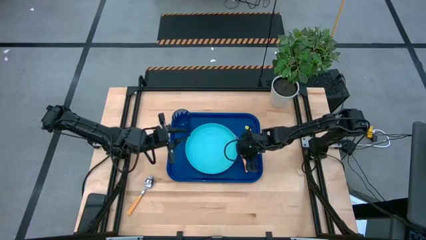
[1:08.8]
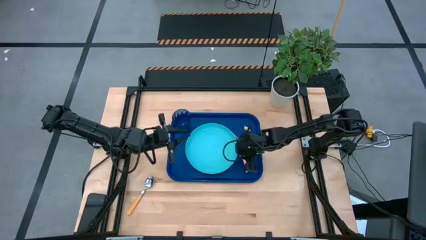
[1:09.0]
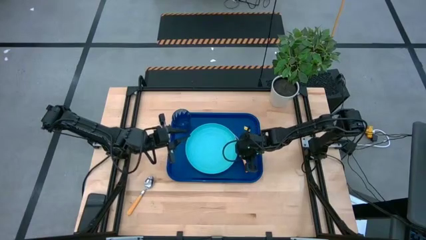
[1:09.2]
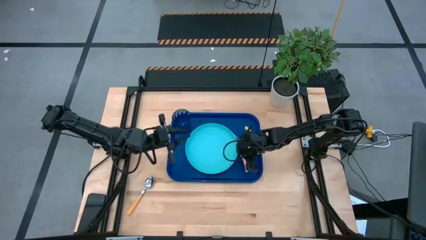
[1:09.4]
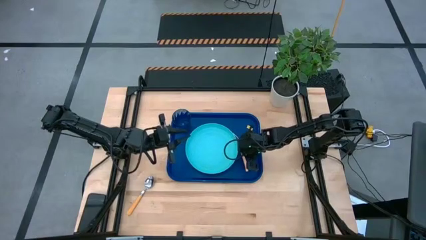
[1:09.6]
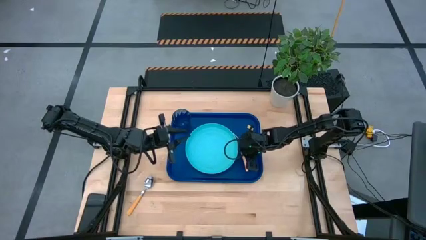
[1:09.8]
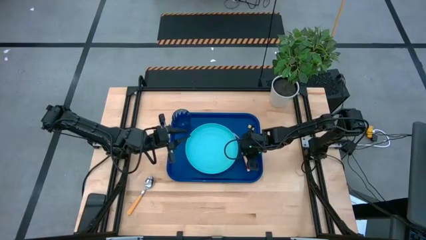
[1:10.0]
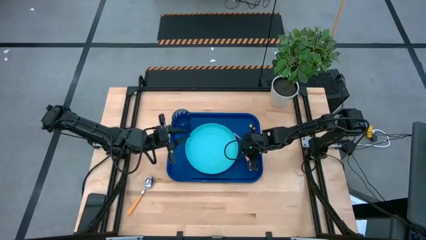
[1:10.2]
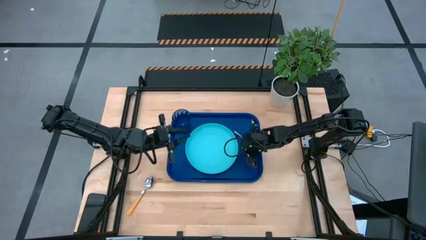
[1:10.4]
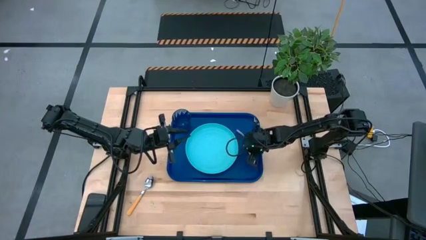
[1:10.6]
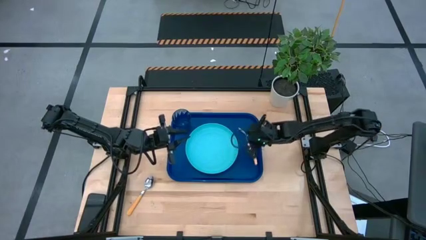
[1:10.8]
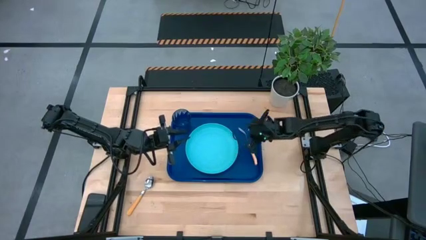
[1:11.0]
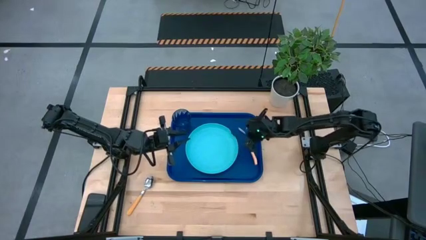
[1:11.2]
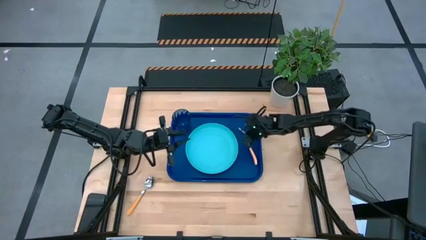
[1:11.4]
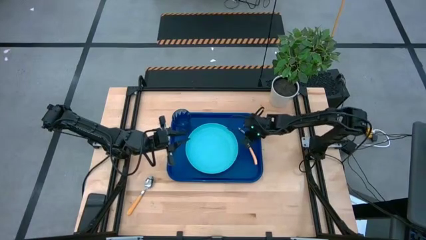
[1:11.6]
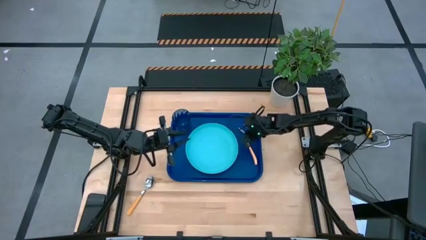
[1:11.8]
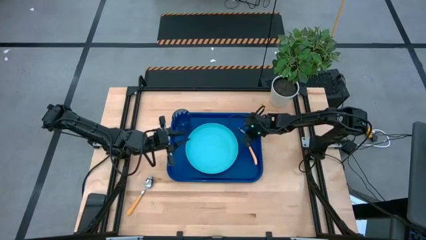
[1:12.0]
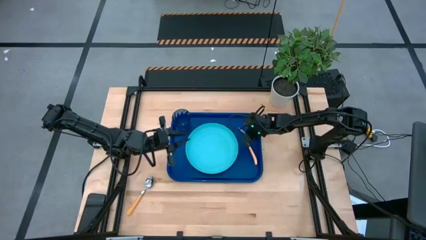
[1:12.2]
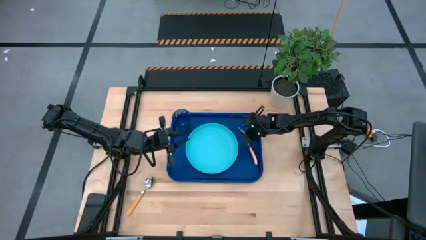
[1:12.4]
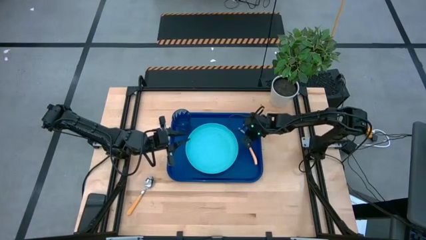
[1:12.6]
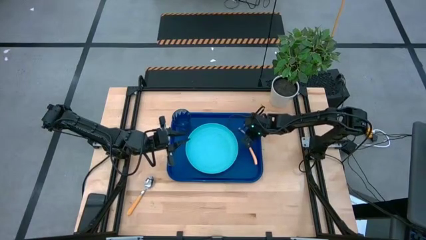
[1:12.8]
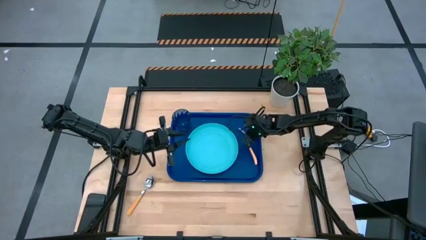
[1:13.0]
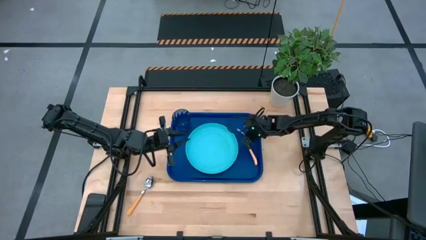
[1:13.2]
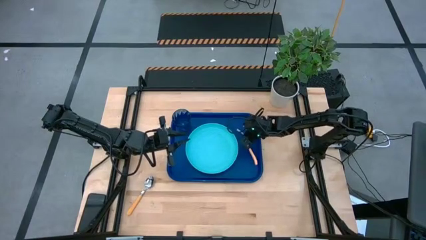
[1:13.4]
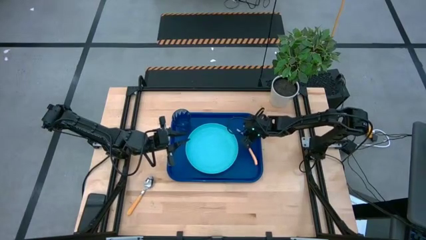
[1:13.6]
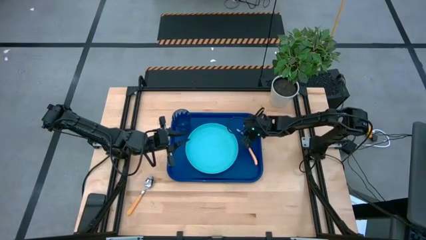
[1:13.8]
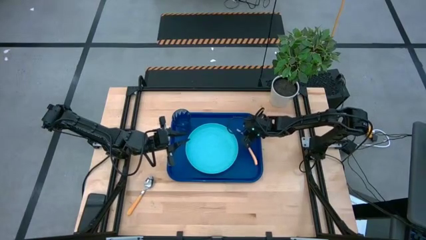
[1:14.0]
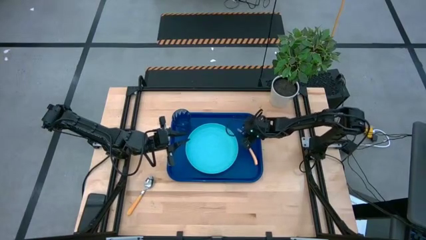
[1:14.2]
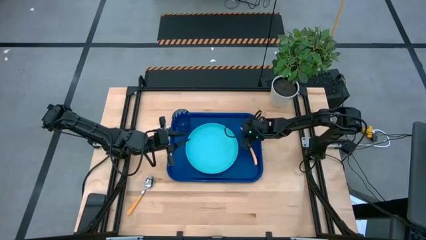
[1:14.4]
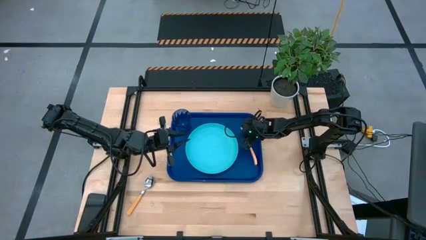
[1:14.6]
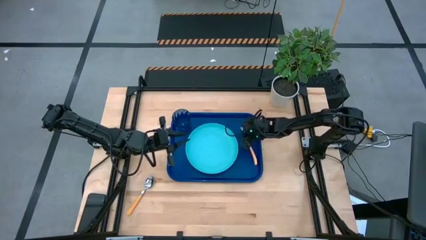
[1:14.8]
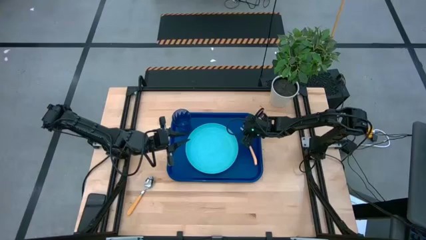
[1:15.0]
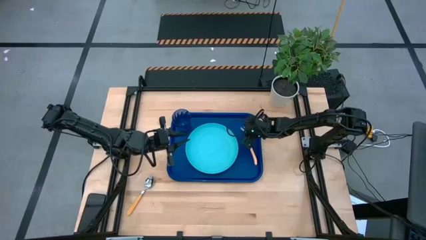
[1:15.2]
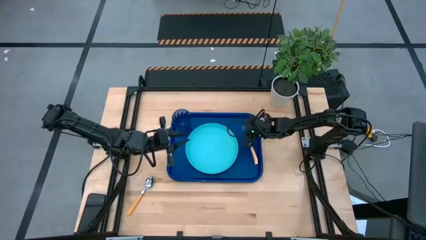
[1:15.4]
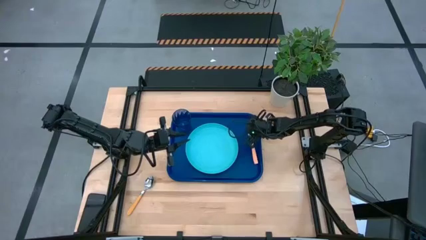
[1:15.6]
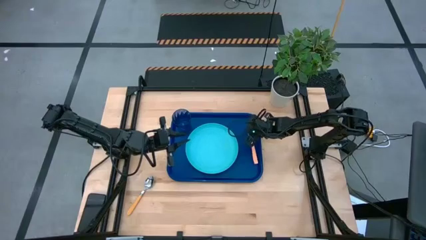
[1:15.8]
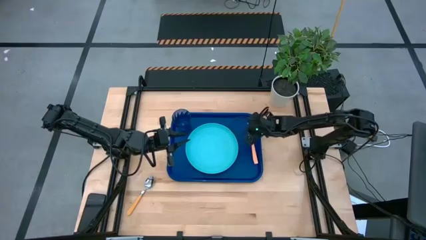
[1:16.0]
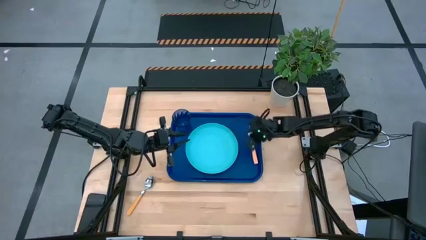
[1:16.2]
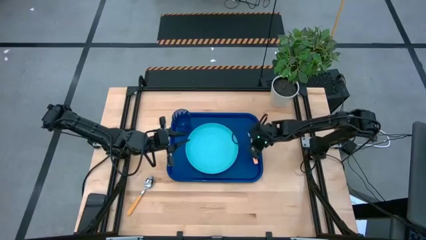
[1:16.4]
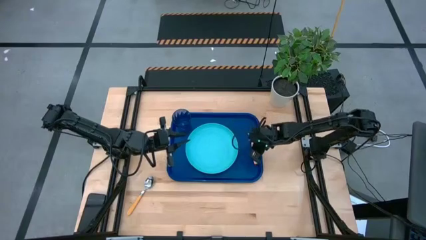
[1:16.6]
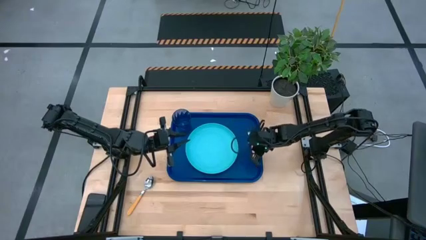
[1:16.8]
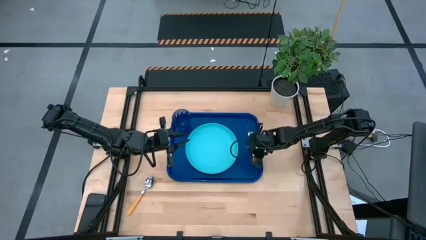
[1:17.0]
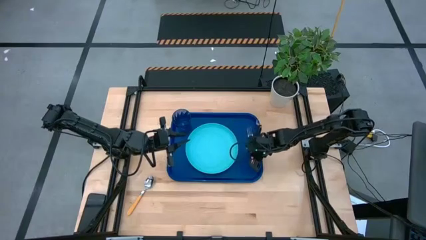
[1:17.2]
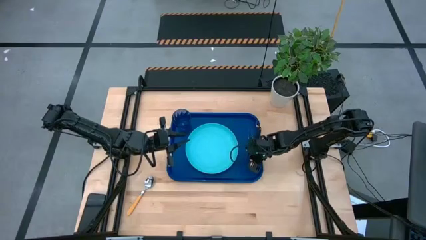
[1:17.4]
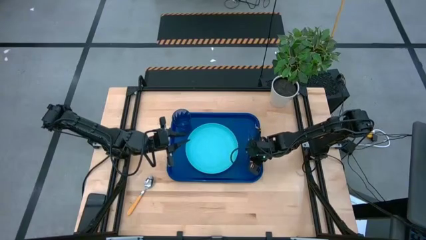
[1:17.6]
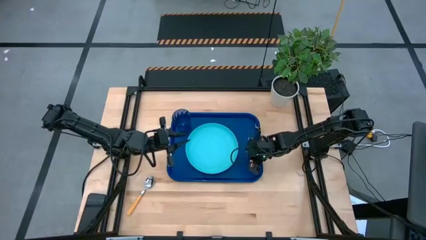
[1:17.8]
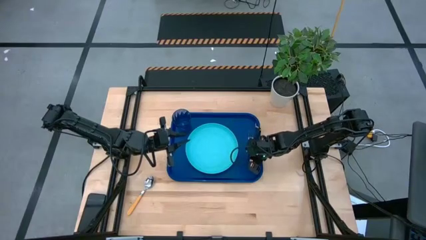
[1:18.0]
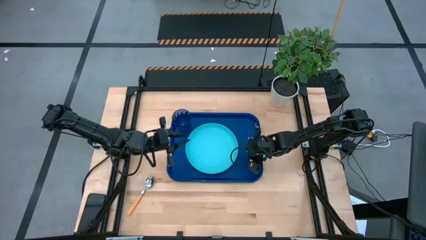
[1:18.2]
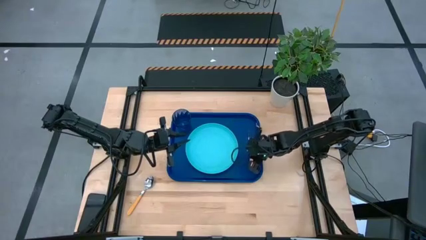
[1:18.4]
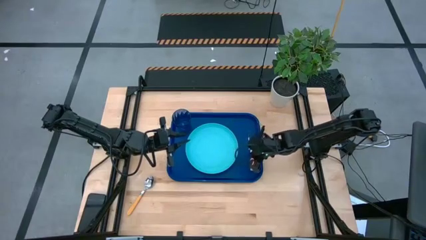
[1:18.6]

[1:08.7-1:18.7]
Task: Pick and place plate/cup/fork/spoon on tray
Put the orange fork beside the light blue plate
